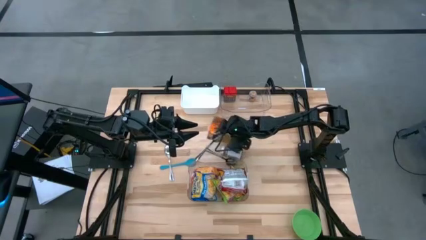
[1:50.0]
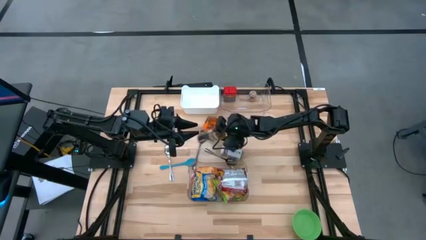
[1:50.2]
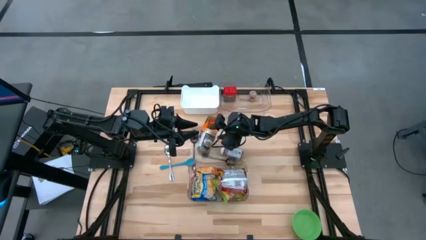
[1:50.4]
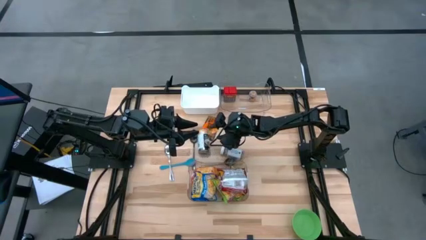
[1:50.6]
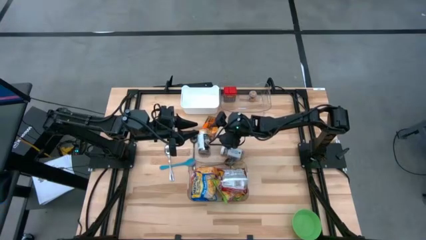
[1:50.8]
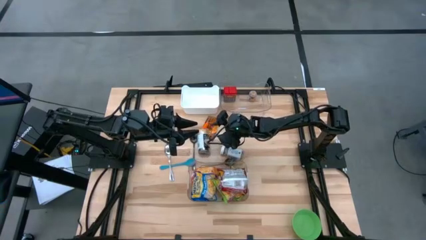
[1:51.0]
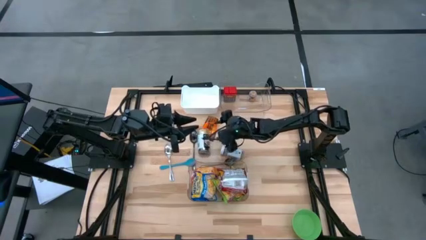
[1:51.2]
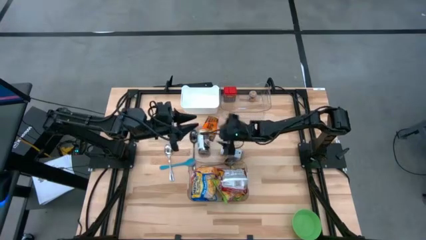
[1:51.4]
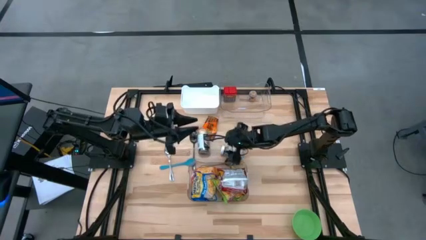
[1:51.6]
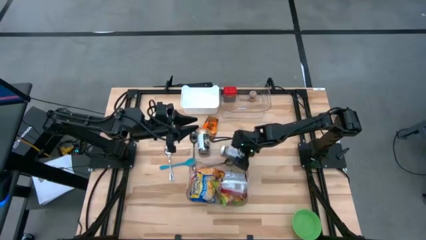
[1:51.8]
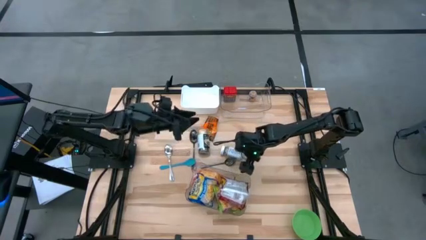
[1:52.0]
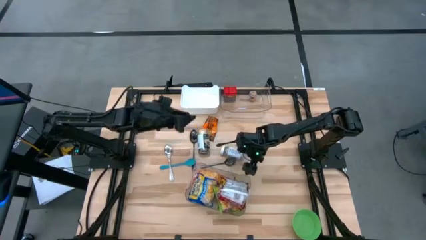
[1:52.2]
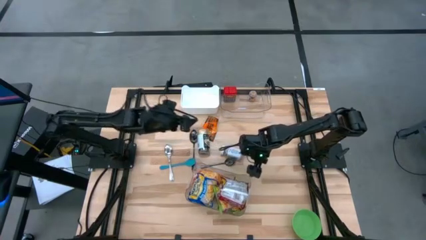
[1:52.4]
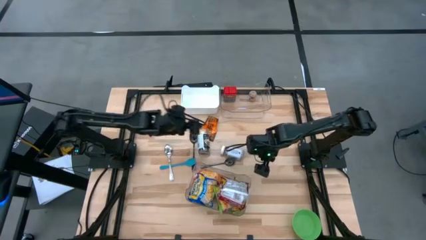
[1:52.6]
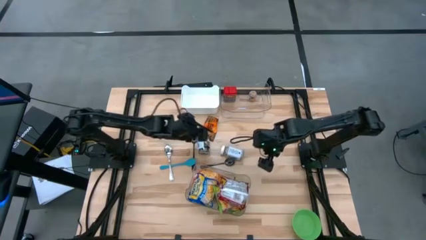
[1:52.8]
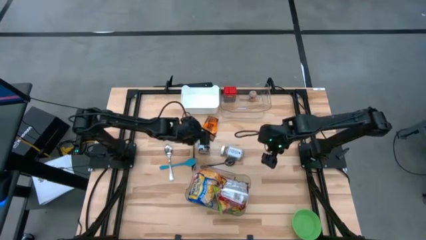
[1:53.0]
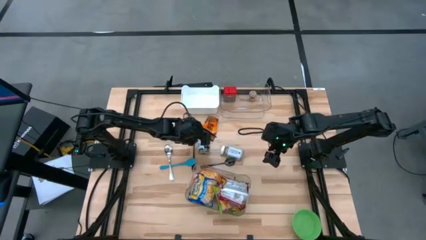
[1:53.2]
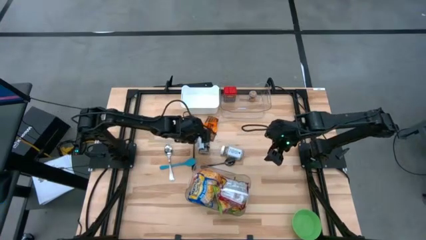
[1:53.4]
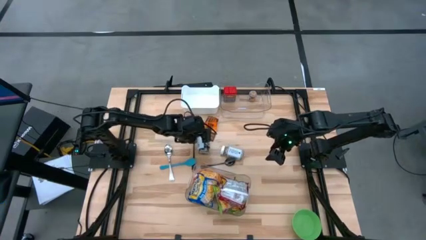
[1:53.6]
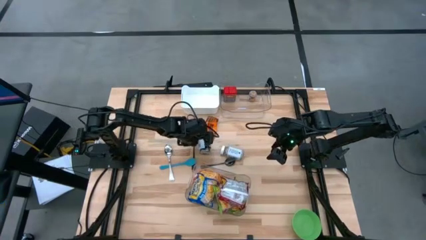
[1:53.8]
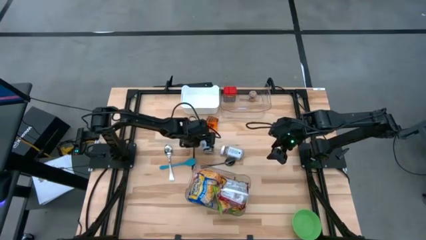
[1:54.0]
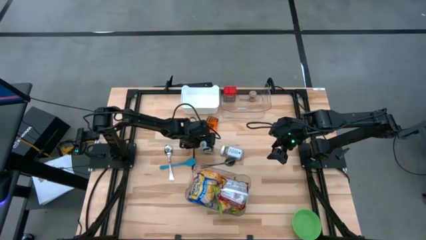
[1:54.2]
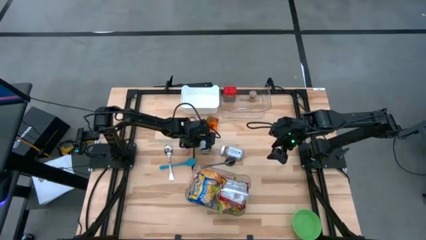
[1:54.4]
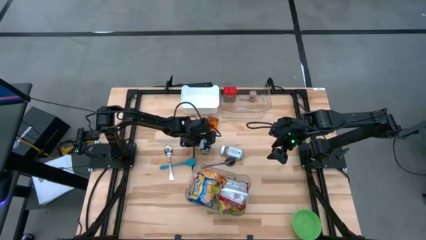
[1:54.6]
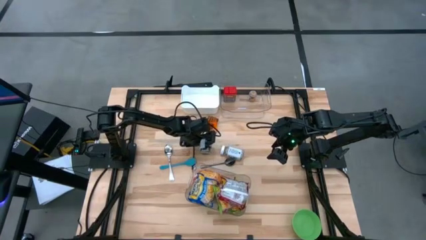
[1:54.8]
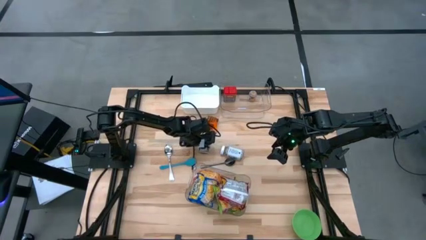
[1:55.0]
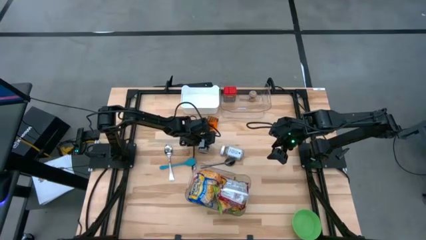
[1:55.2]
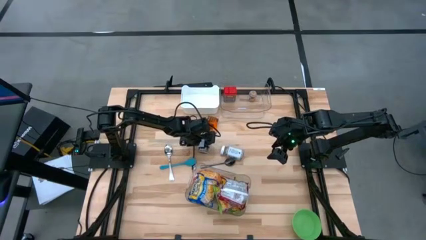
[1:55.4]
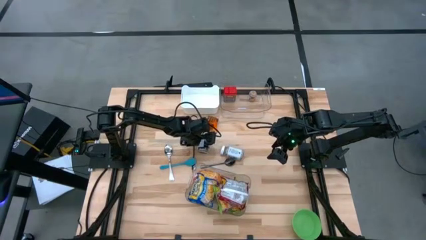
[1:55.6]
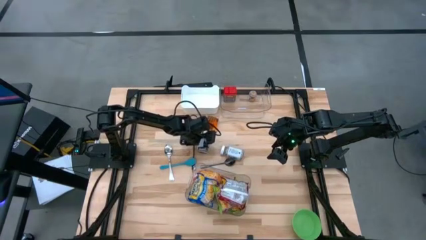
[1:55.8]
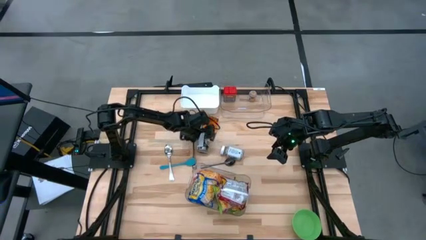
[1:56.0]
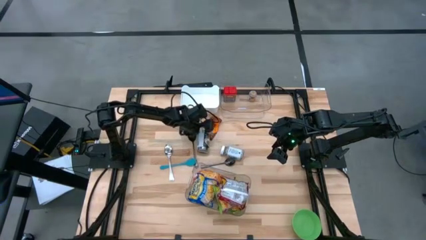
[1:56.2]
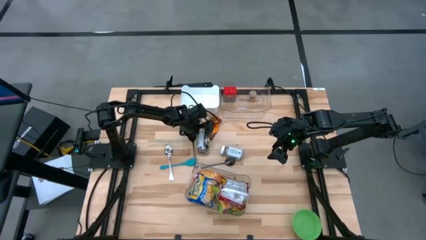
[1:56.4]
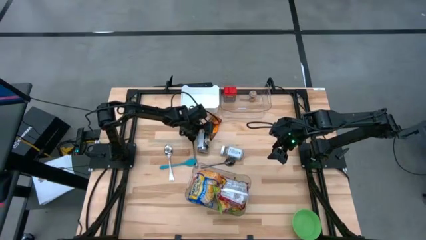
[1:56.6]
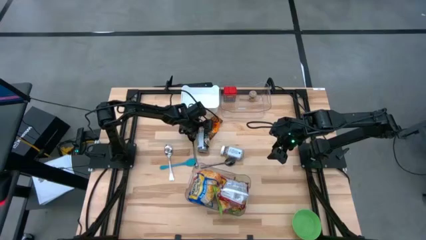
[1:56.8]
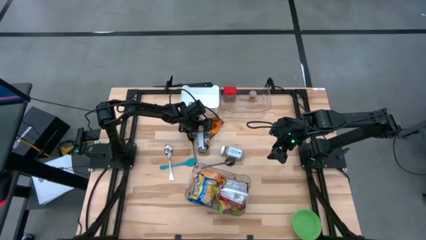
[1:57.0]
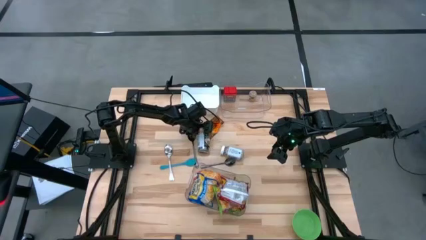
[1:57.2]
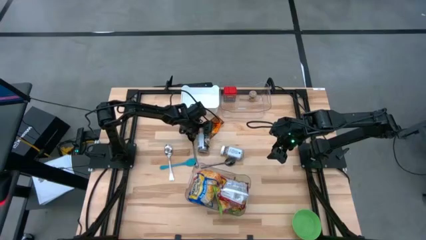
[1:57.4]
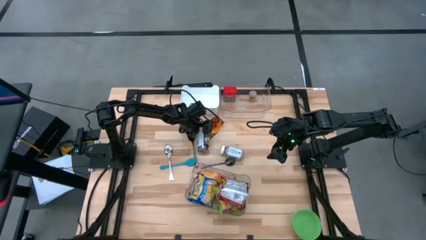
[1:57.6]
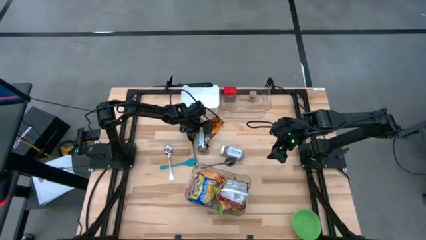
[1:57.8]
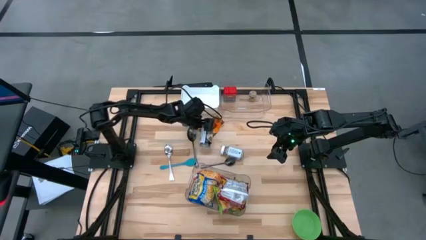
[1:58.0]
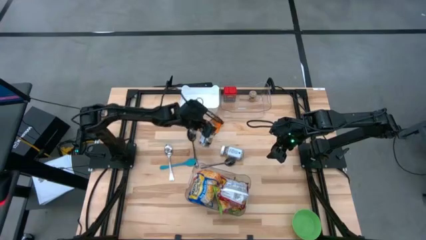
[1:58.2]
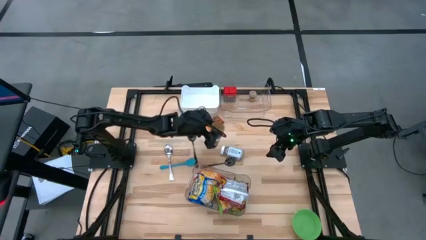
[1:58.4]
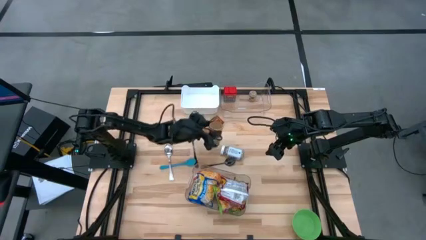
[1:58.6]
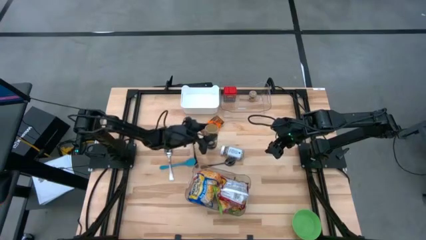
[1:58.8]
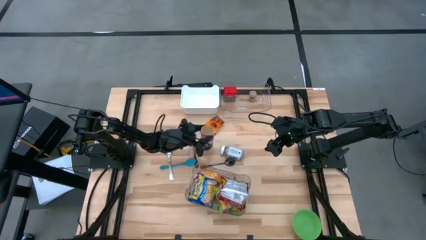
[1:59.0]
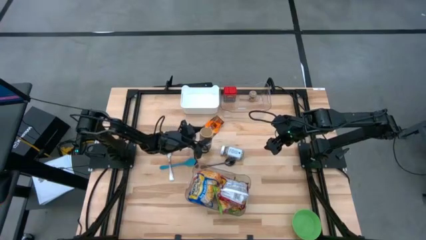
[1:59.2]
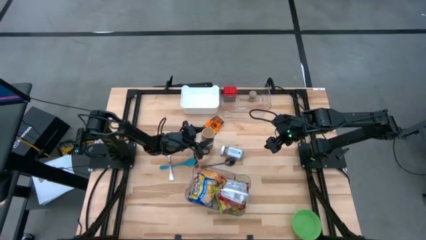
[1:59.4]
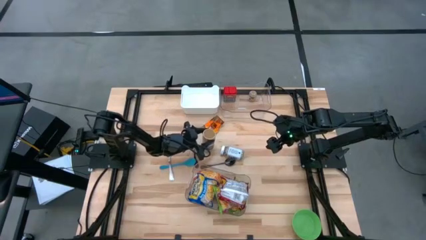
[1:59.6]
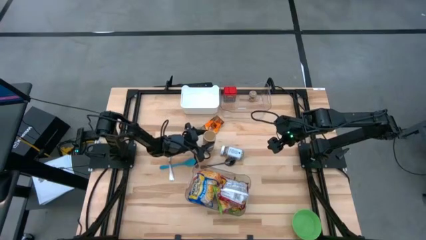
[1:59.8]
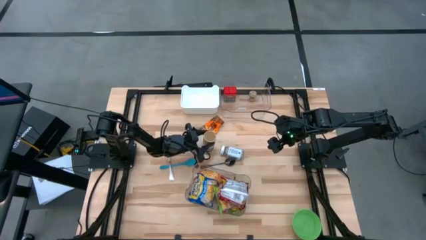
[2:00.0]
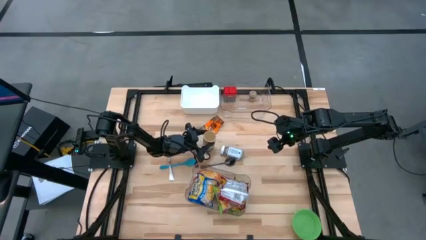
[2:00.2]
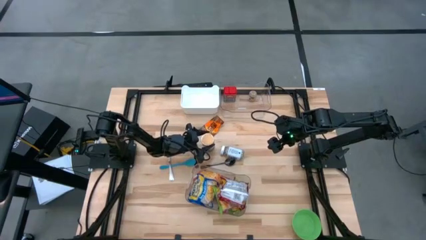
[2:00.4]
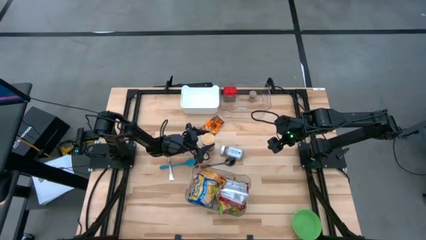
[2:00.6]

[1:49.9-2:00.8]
Task: Pick & Place Food Item
Put the gold seasoning into the top transparent bin

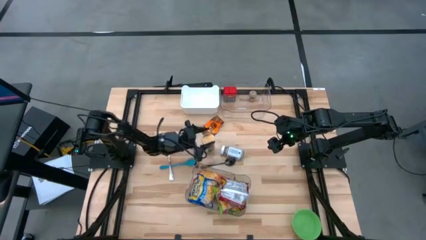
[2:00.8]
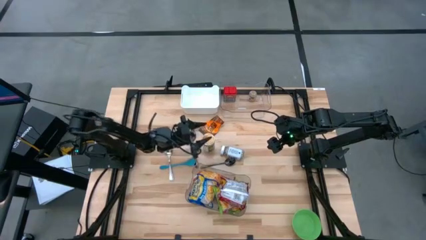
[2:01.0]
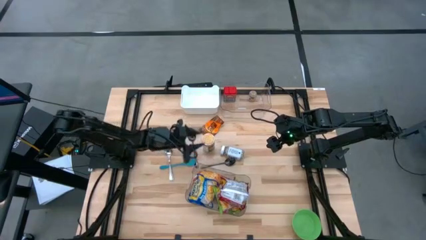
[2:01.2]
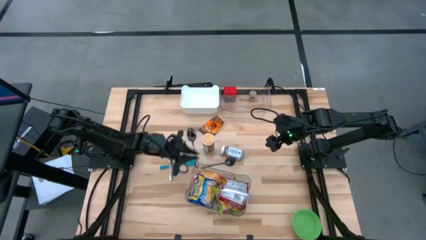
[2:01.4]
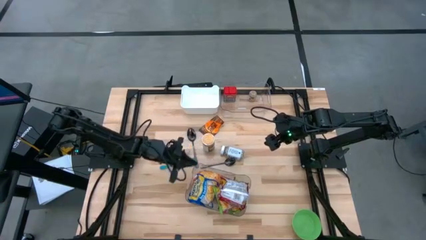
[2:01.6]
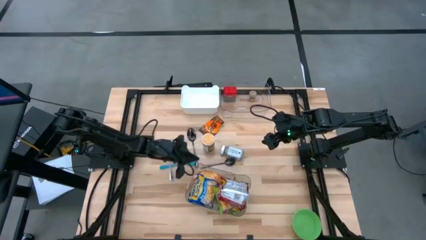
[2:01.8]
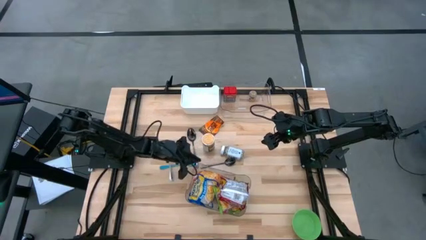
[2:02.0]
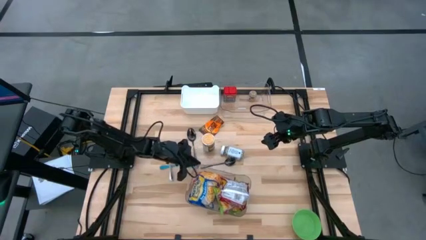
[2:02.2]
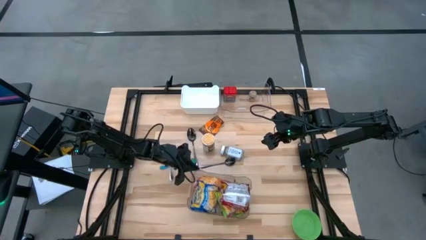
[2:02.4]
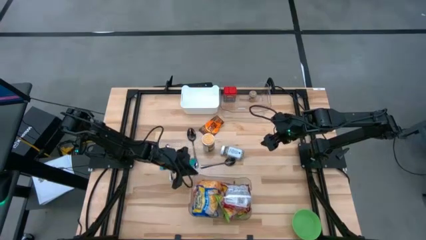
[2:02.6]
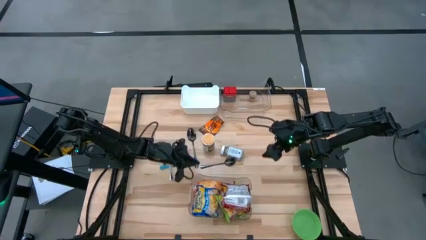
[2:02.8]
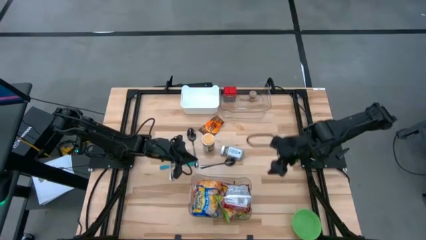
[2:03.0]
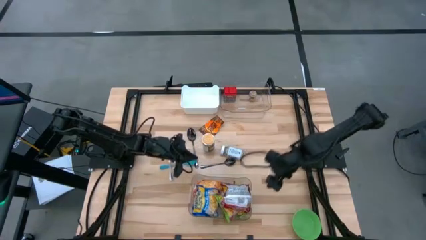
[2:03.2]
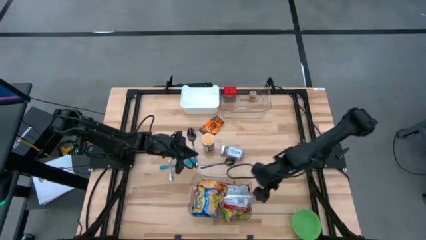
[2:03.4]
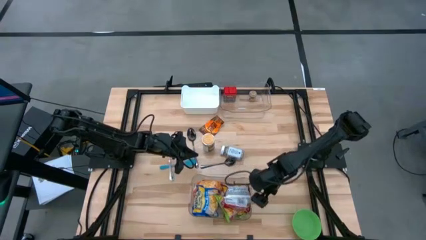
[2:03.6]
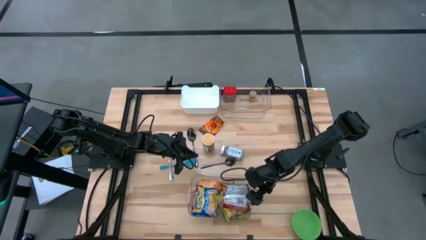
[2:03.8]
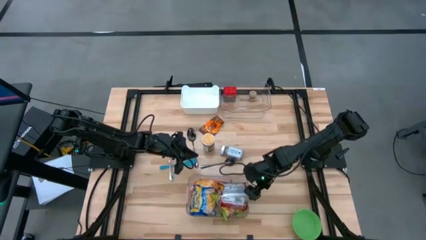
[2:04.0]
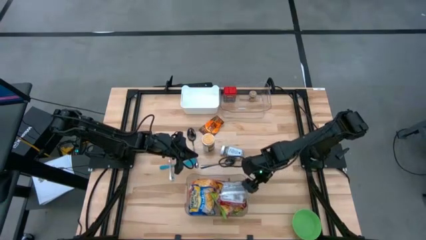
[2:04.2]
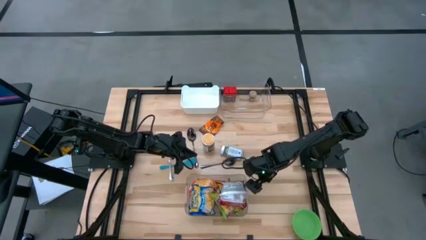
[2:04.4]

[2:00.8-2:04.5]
Adjust the bottom transparent bin
